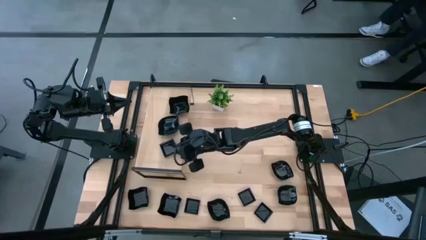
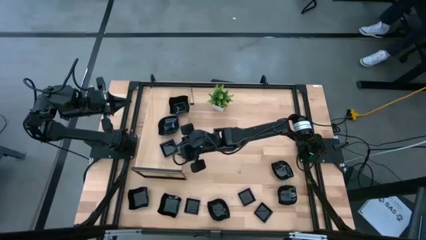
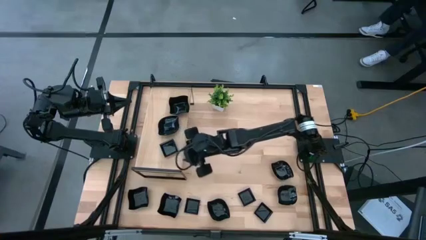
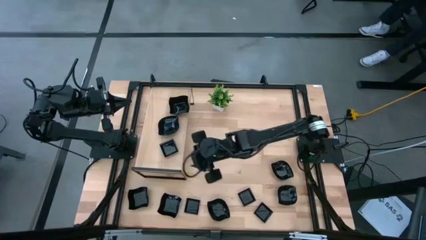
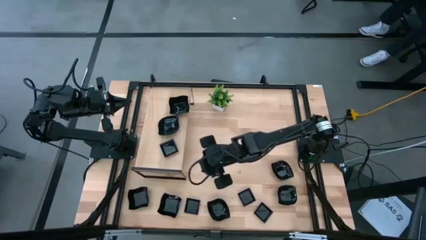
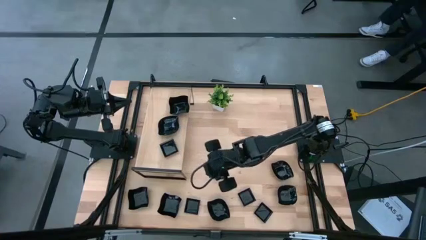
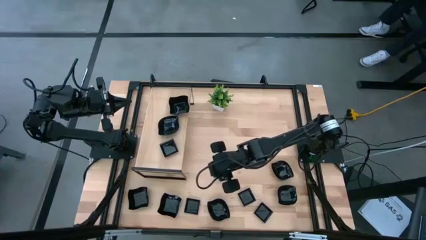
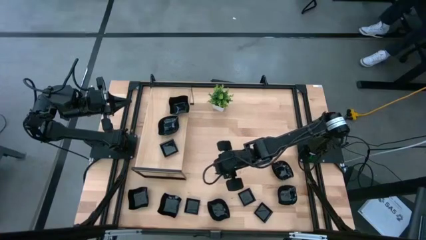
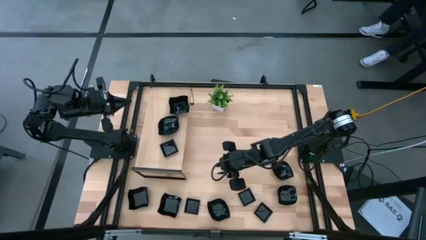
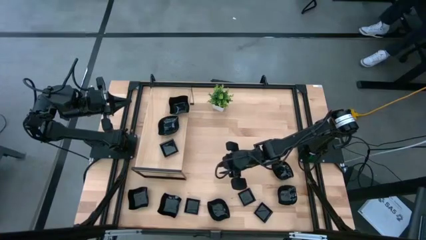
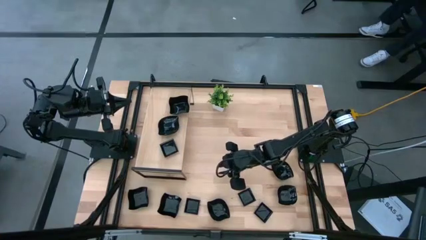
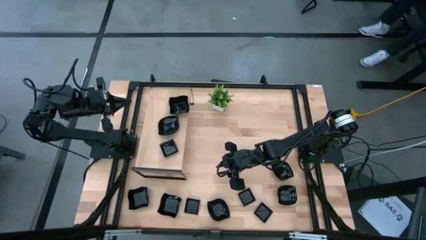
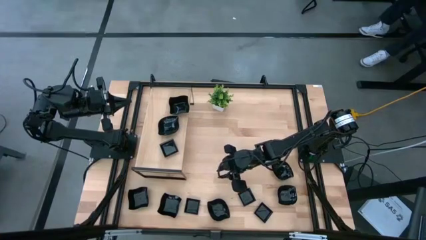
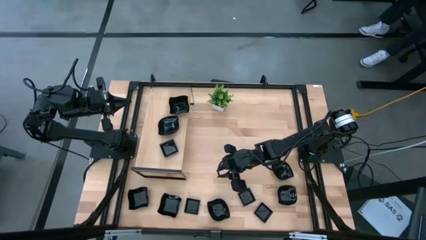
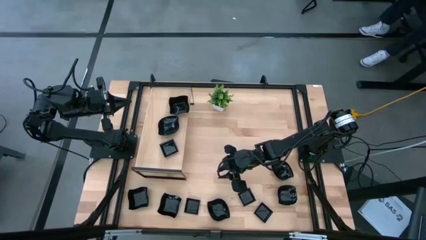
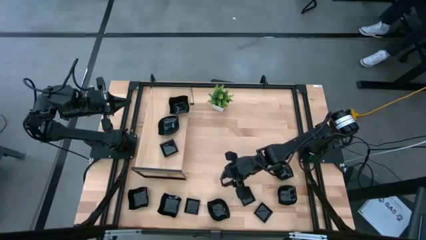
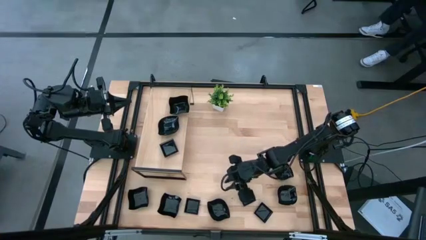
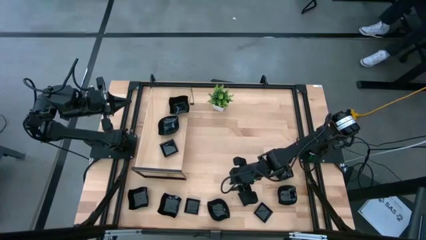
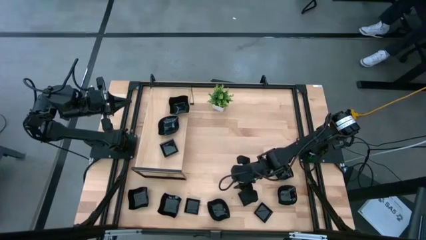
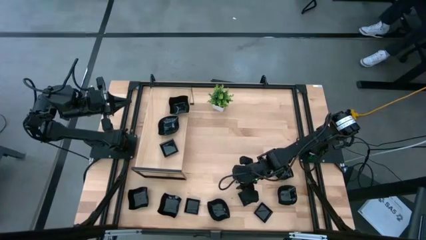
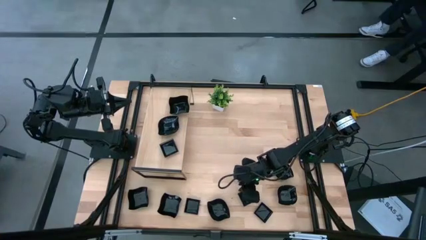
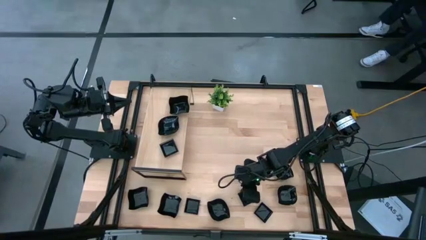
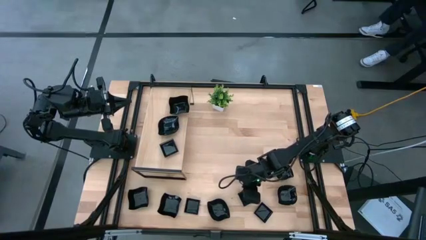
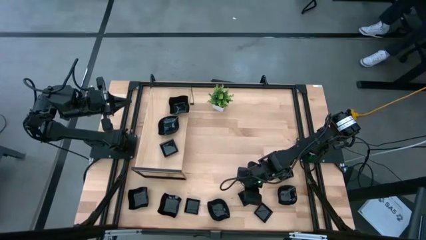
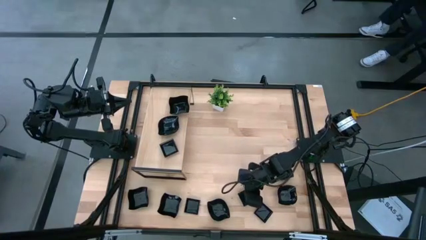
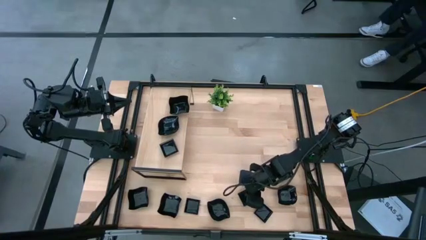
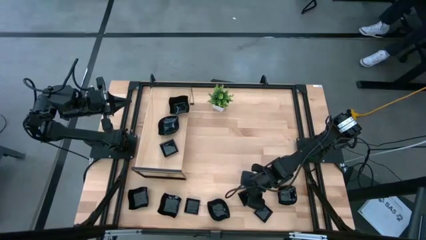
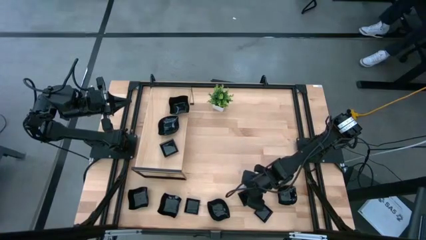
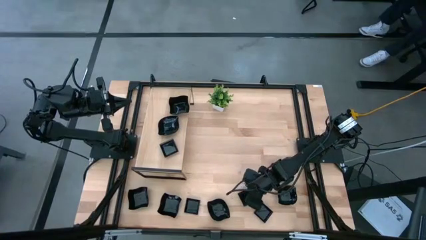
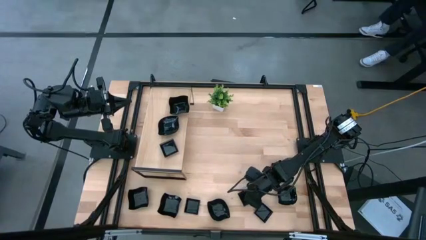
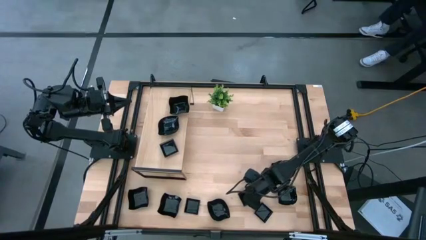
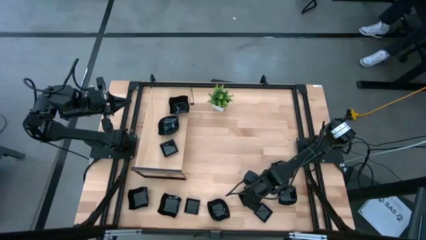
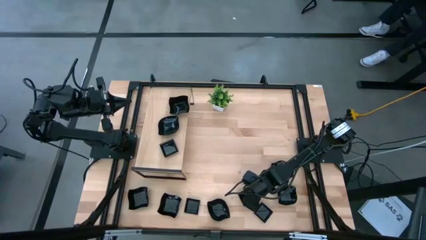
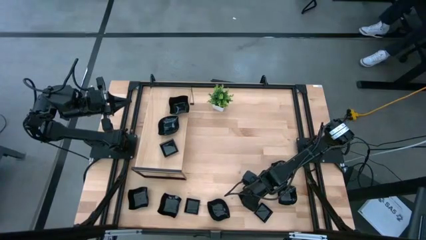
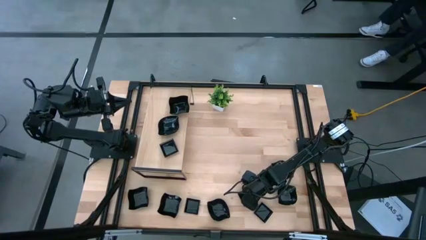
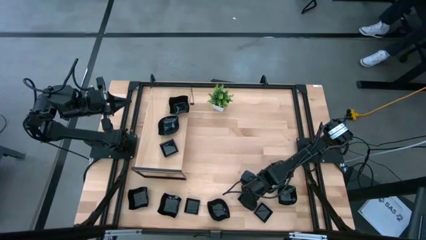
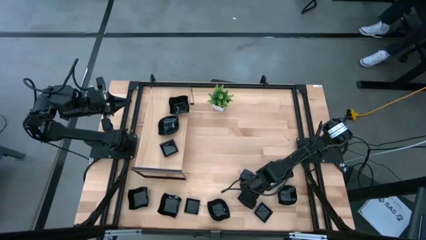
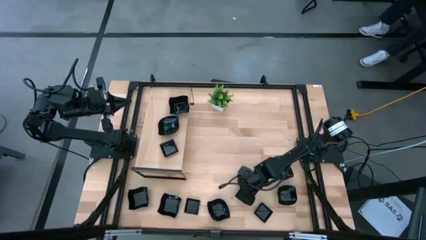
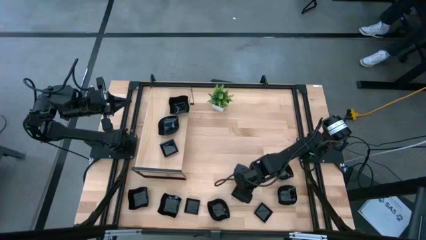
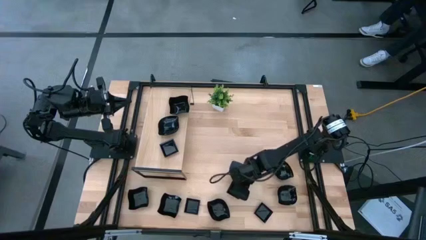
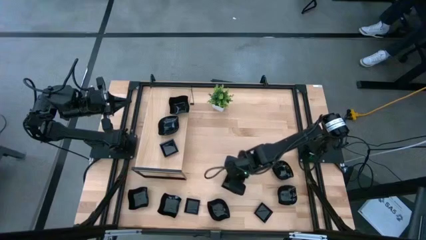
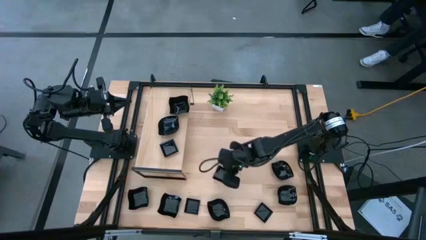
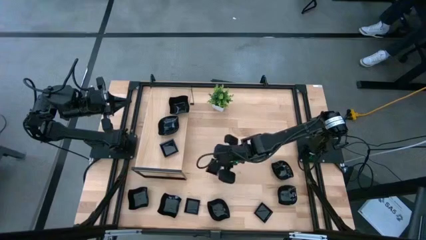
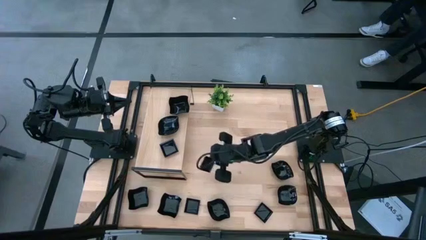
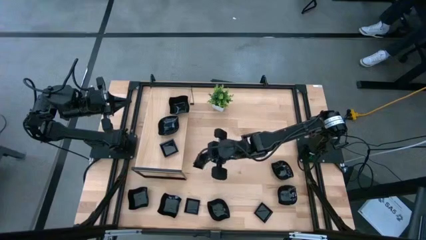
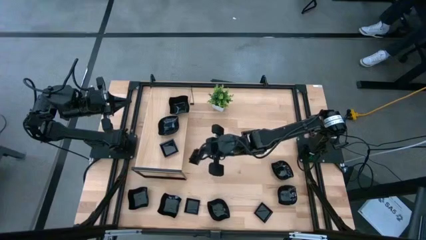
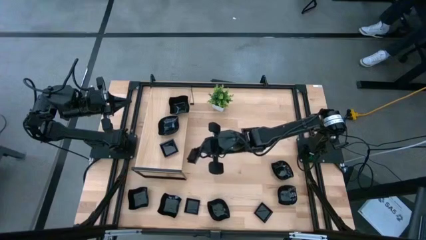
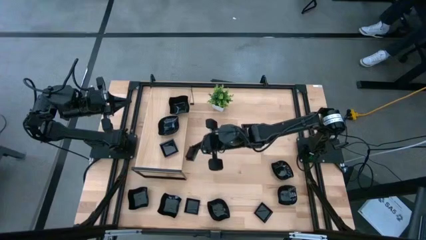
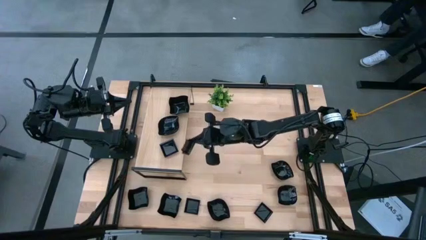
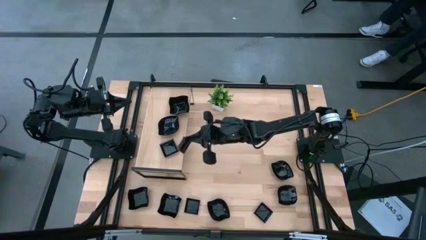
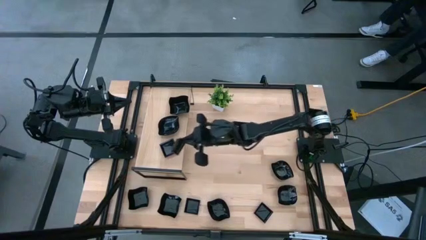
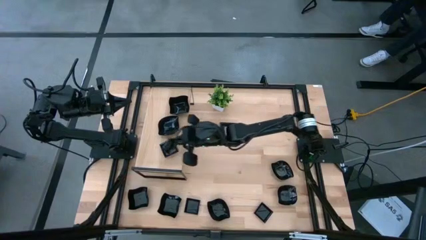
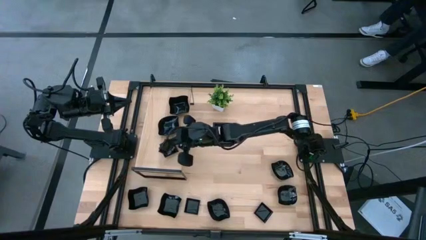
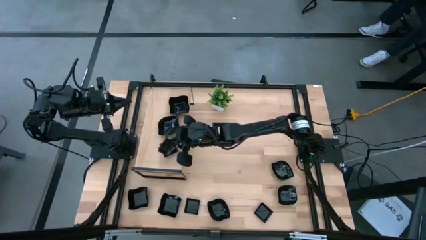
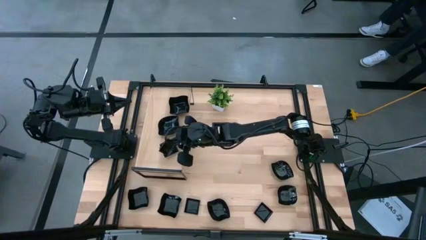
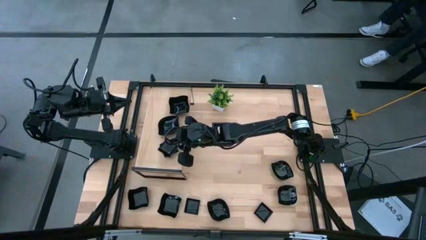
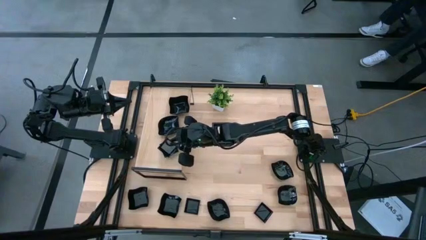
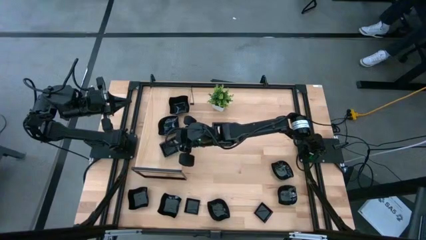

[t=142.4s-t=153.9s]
Task: Pick & Place Mini shaped plates
Stack the black square plate on top of the black square plate on the shelf

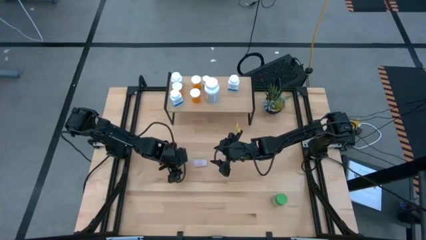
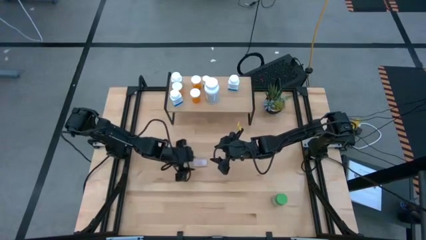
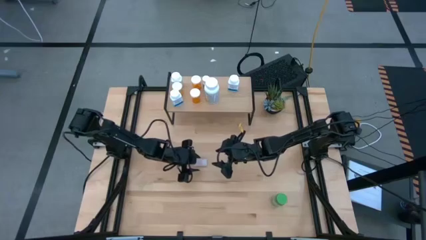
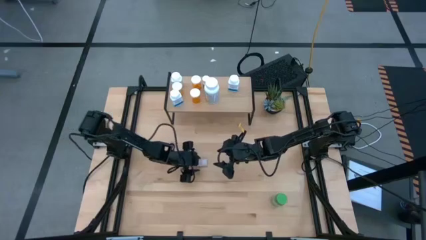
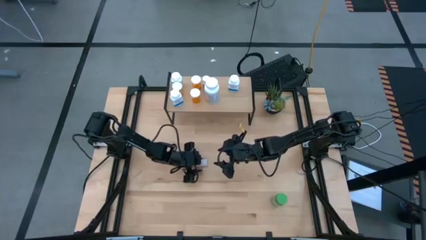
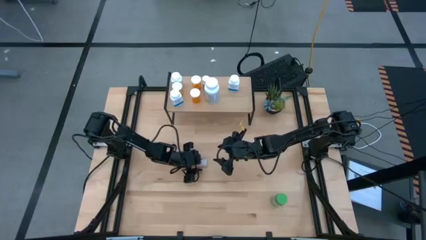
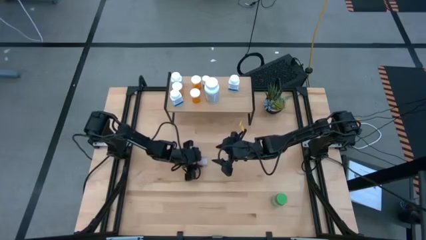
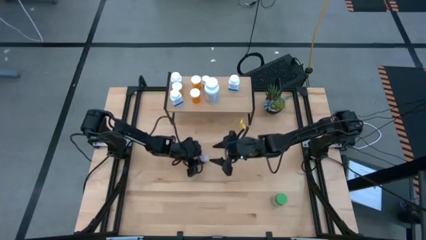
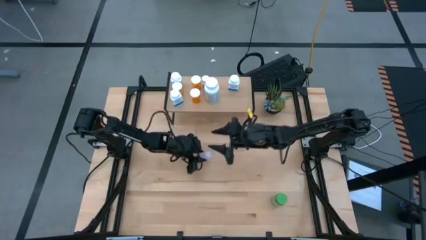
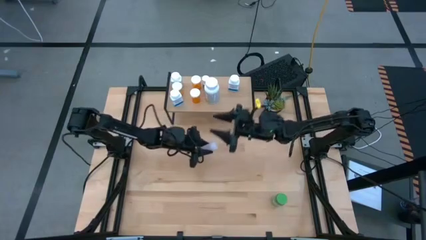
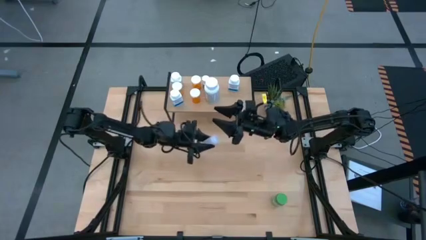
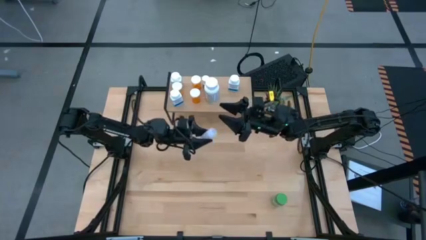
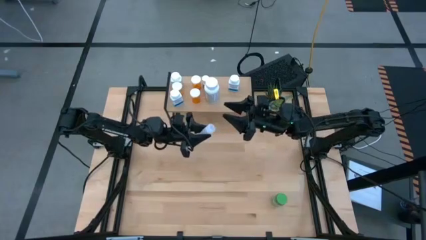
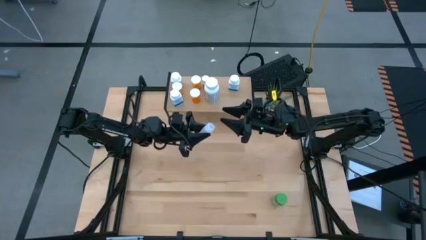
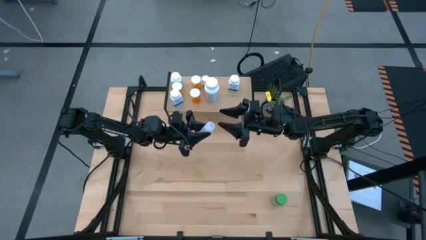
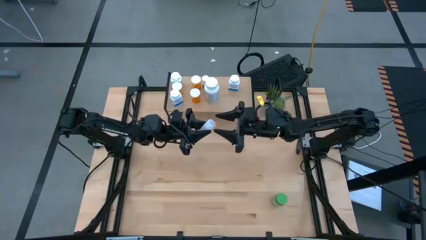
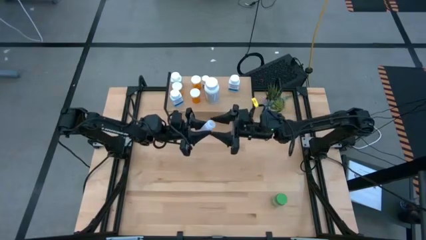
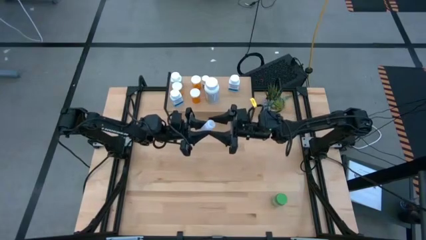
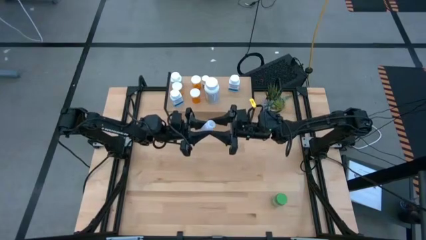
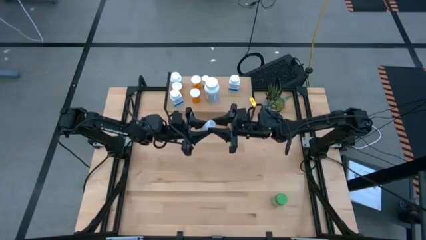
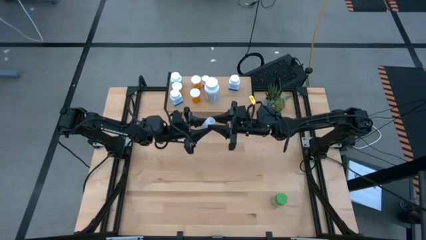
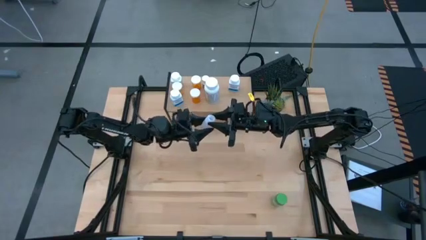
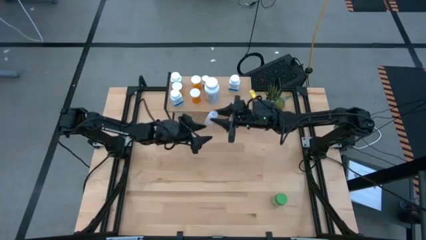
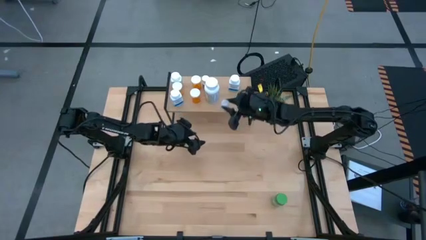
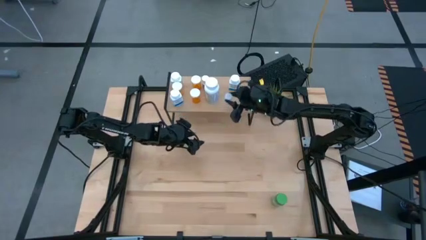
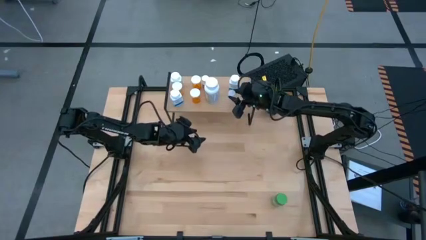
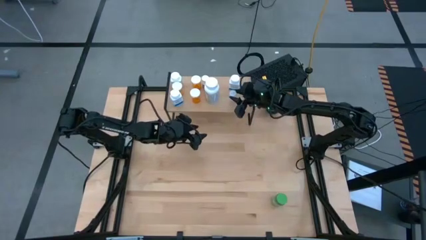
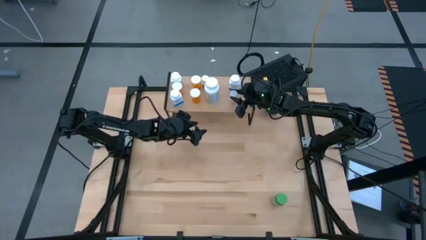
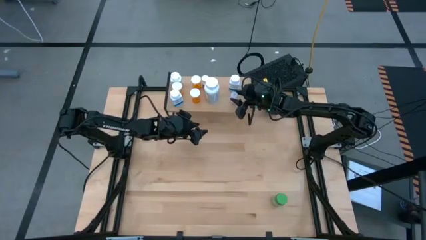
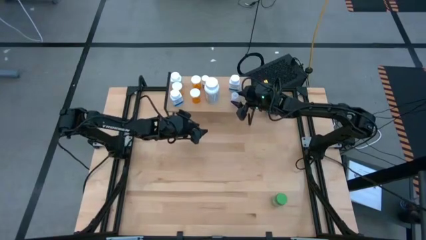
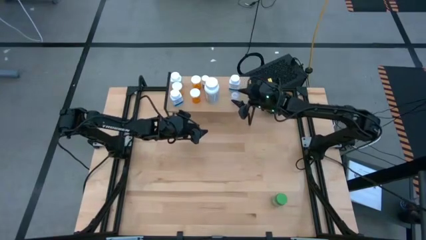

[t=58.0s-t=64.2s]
Task: Pick and place medicine bottles onto shelf by color
Put the transparent pill bottle on the shelf
